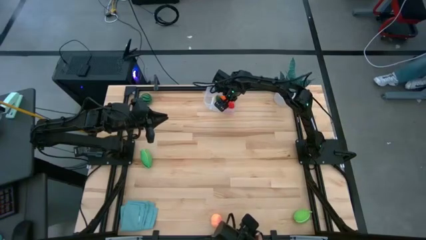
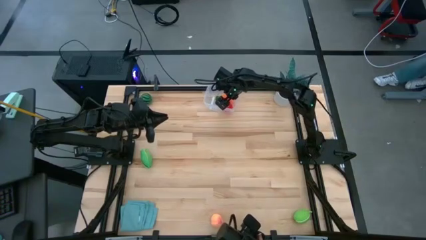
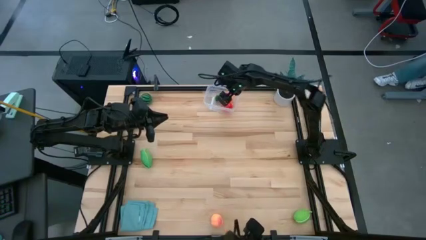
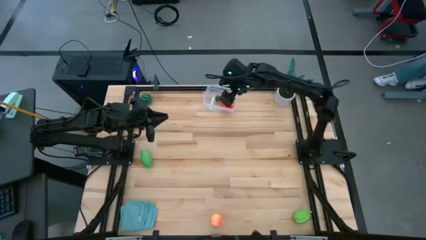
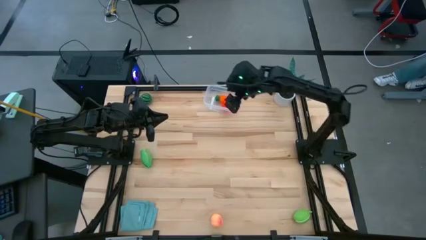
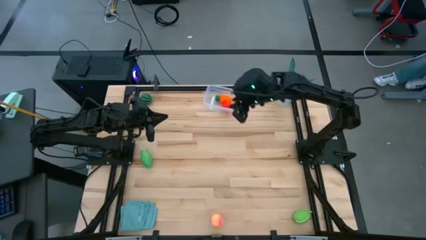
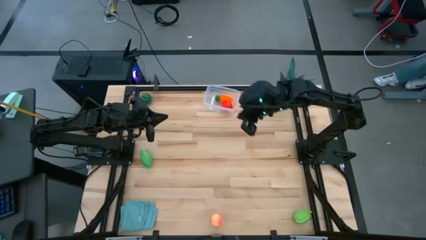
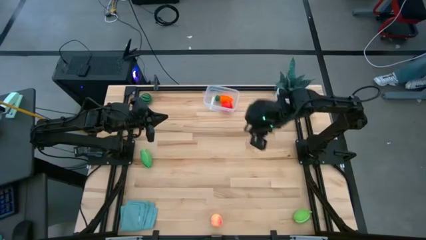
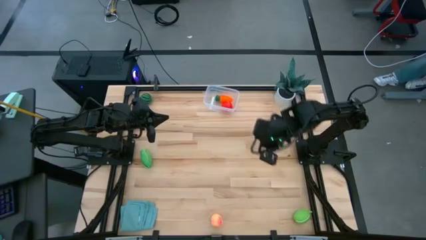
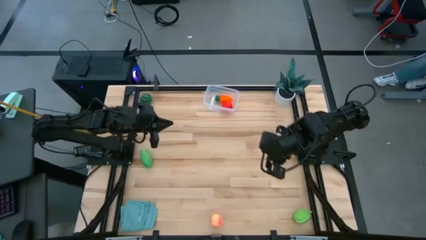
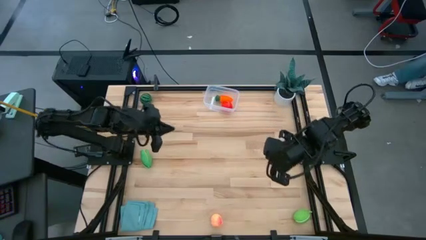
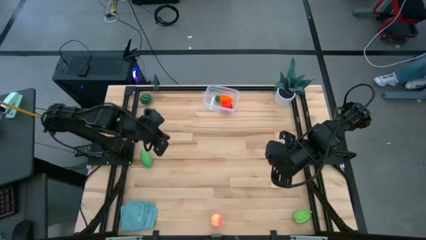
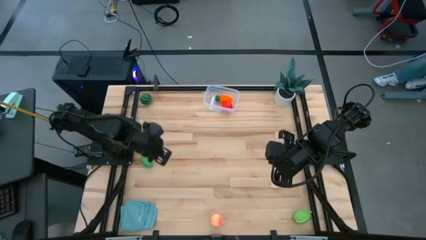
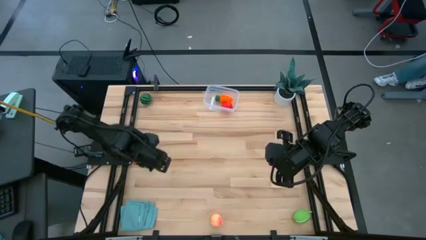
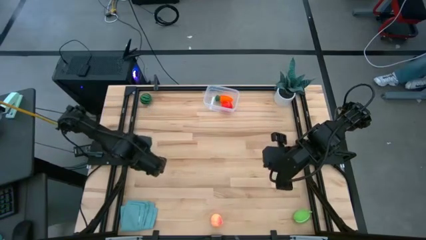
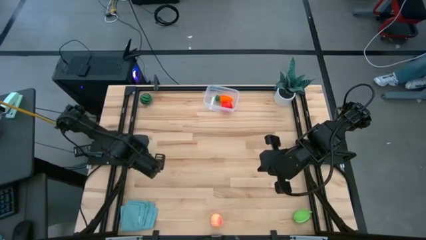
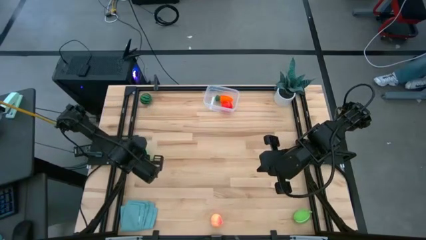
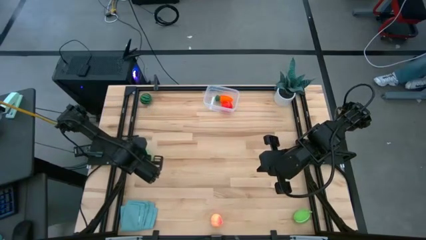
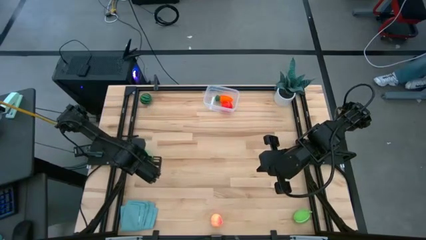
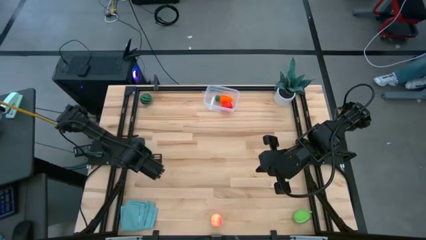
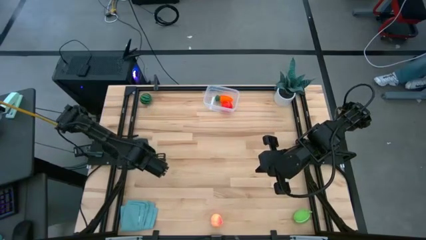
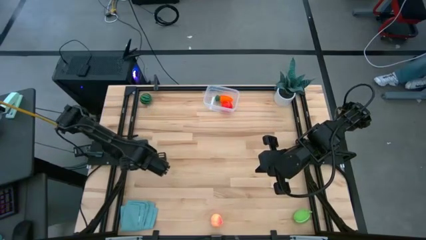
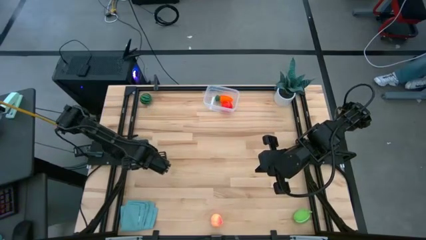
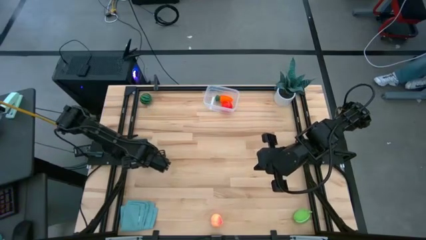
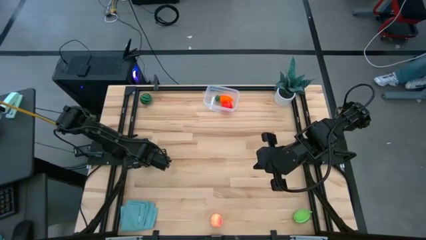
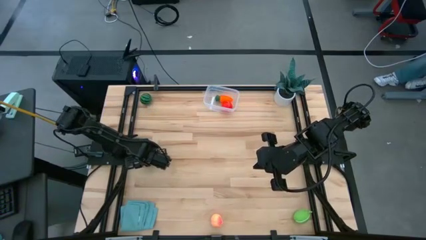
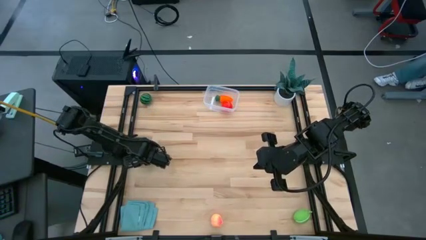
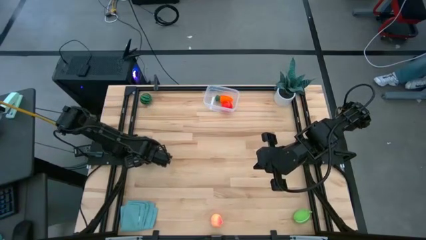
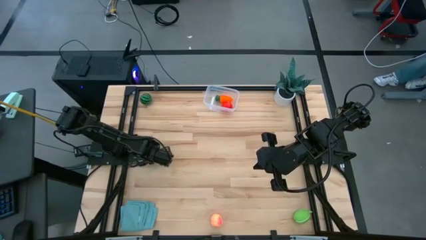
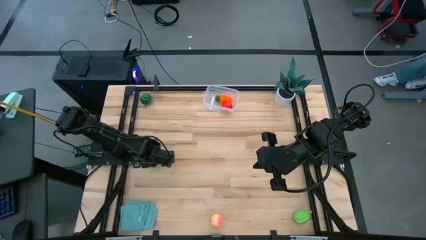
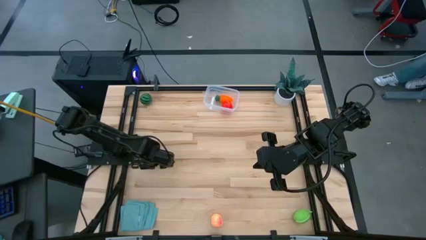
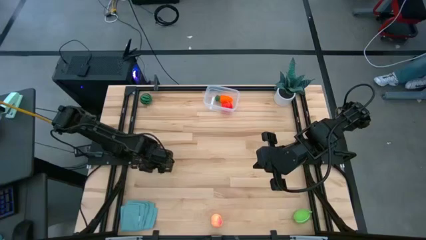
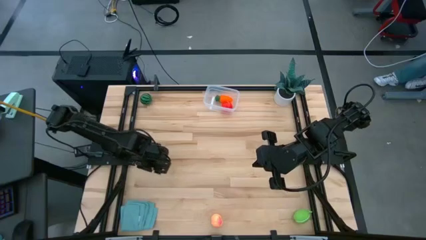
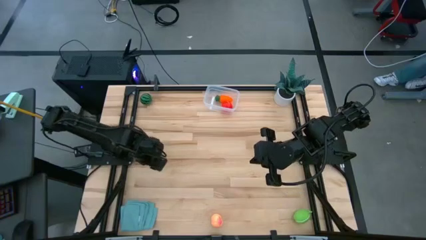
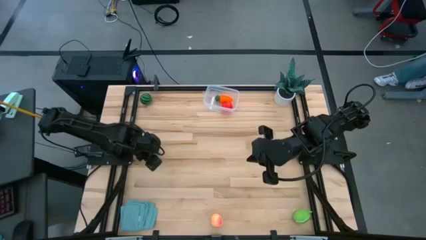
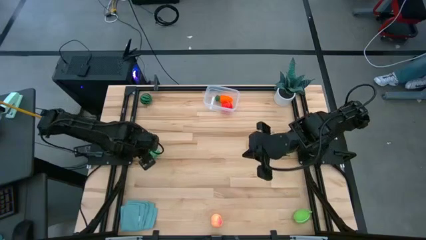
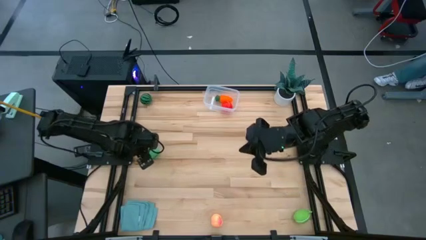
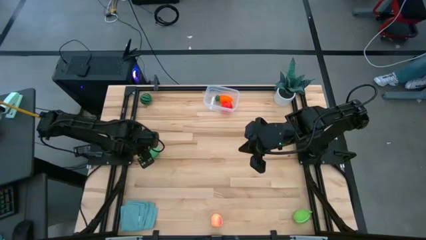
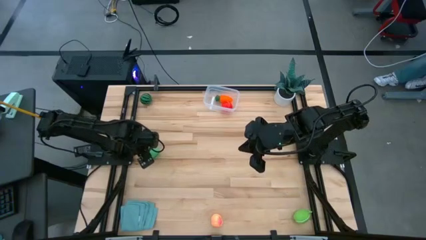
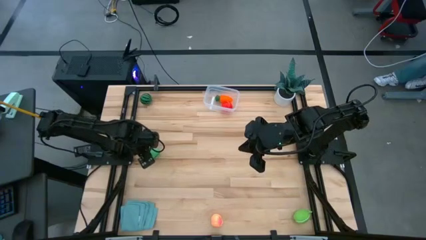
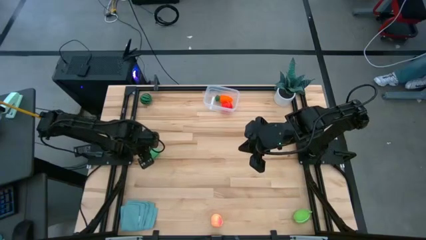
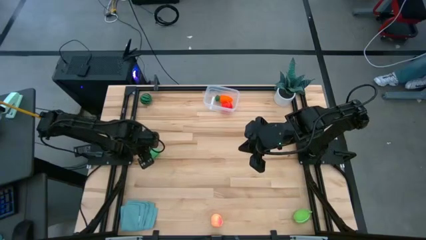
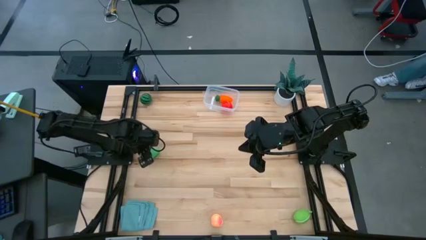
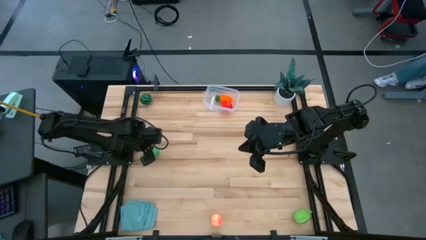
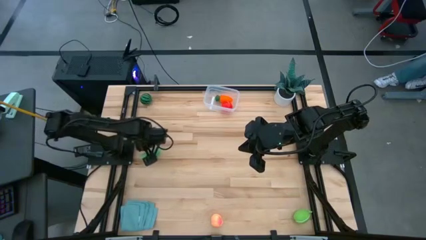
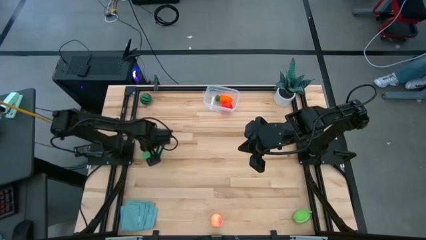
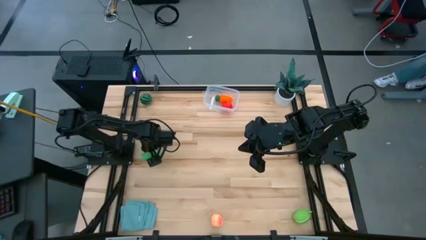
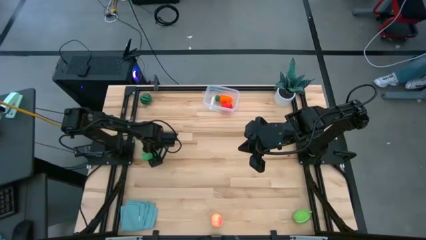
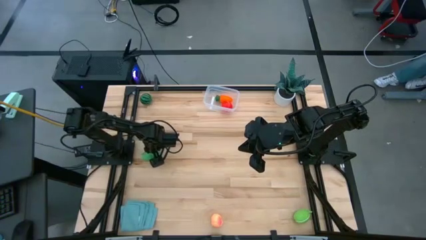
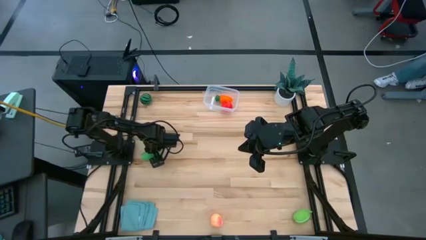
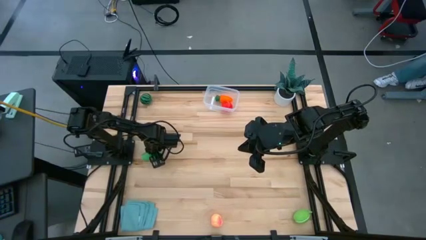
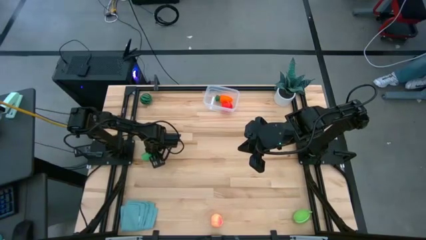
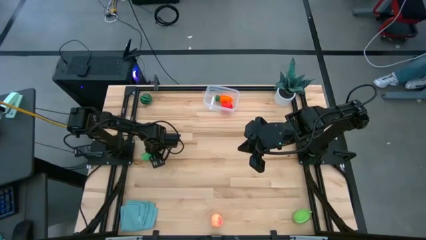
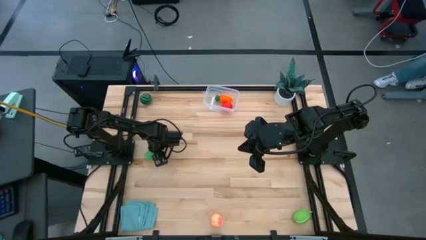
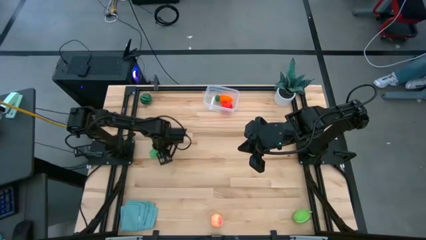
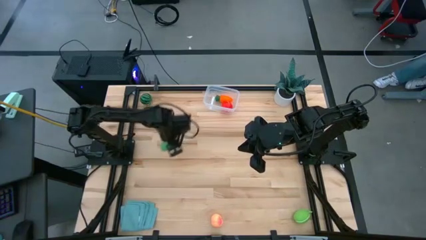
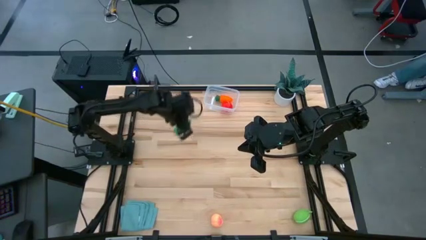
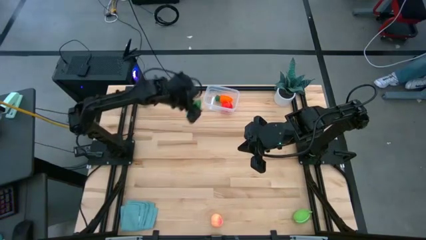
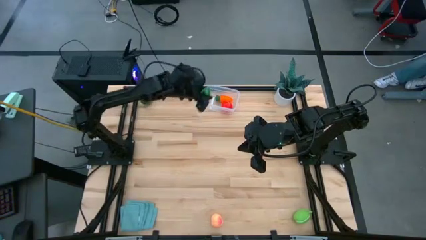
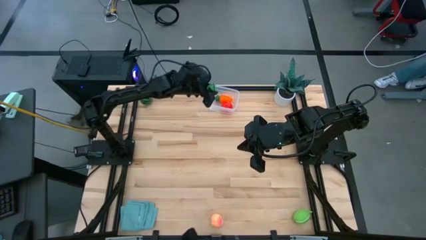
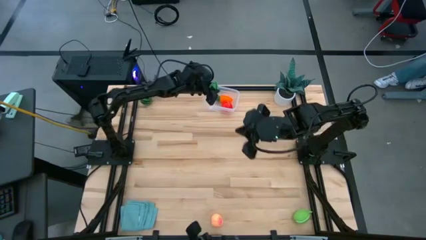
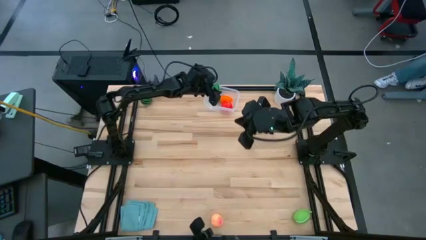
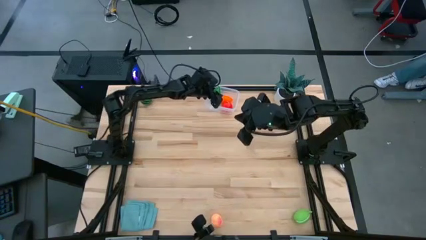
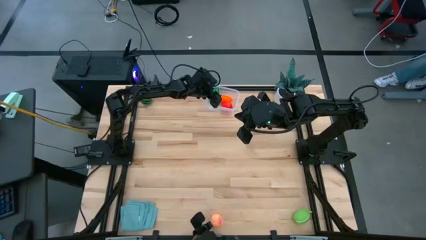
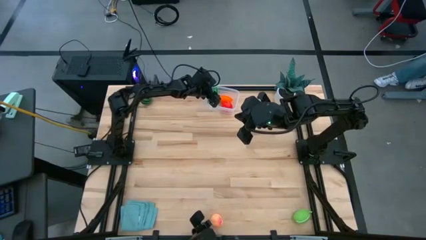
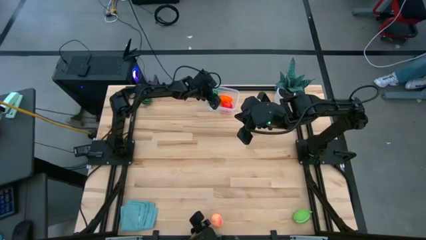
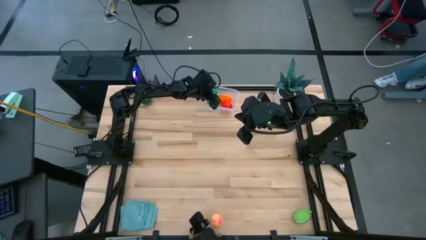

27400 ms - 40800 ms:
Task: Pick and placing Produce into tupperware
Put the corn into the transparent container
